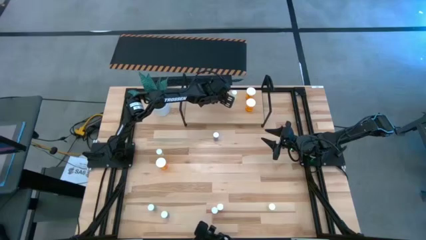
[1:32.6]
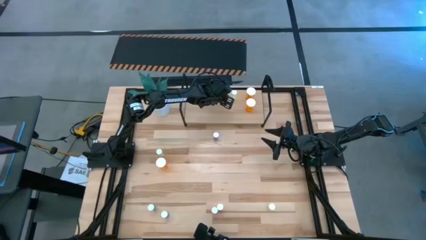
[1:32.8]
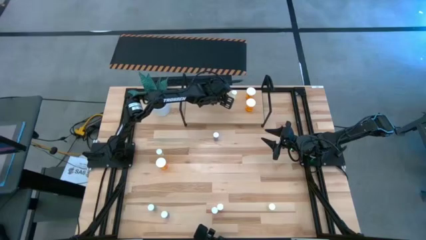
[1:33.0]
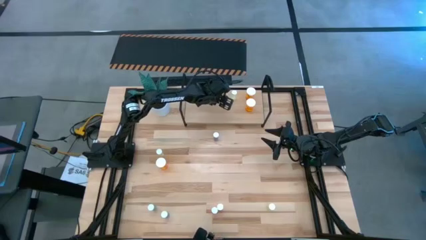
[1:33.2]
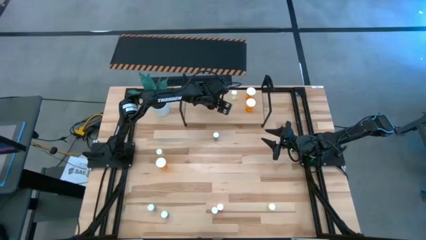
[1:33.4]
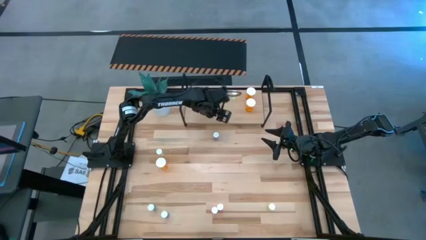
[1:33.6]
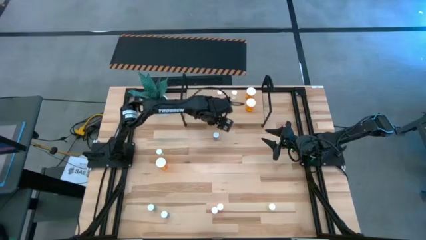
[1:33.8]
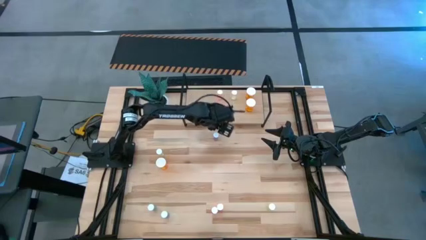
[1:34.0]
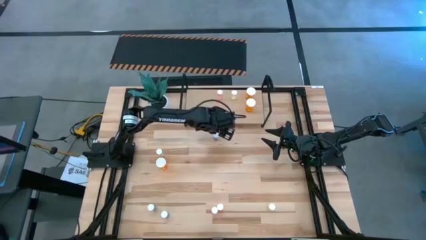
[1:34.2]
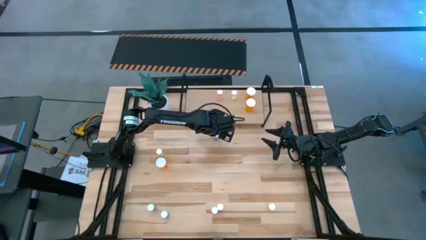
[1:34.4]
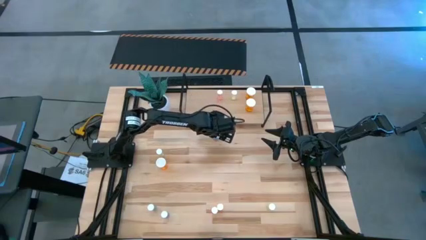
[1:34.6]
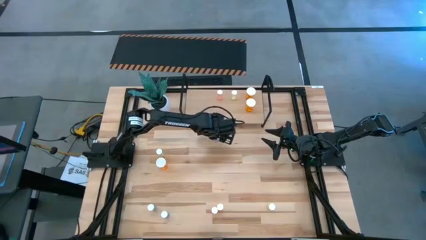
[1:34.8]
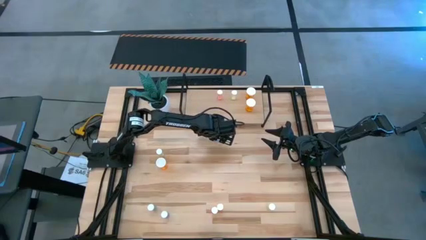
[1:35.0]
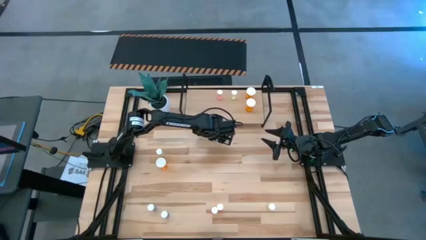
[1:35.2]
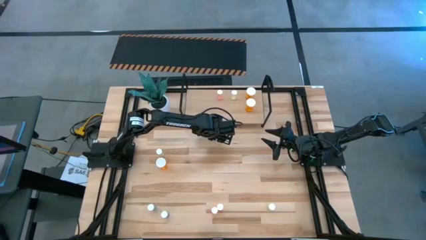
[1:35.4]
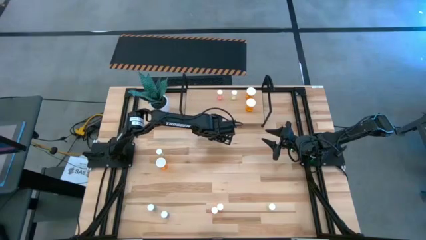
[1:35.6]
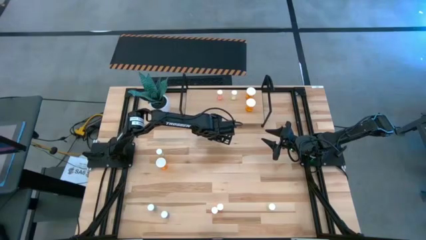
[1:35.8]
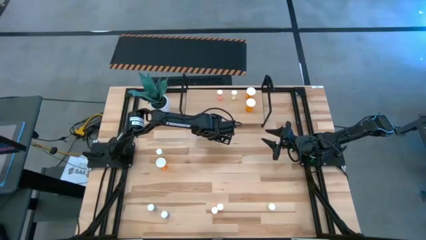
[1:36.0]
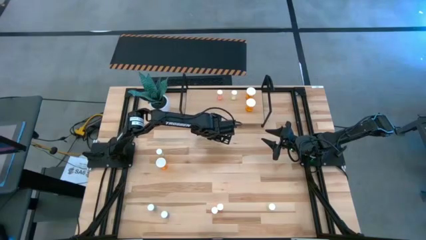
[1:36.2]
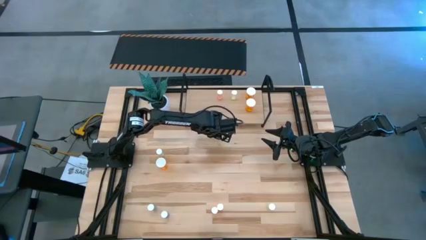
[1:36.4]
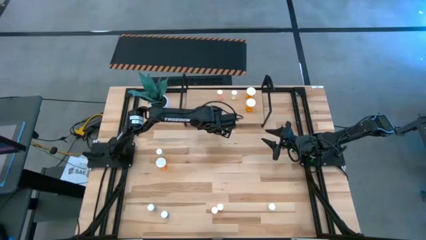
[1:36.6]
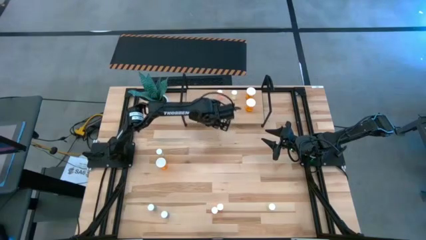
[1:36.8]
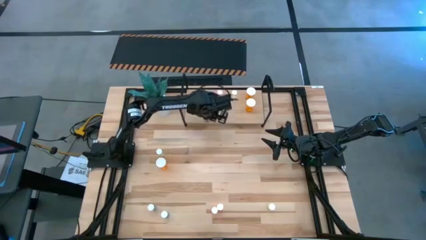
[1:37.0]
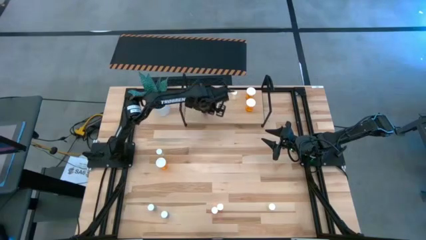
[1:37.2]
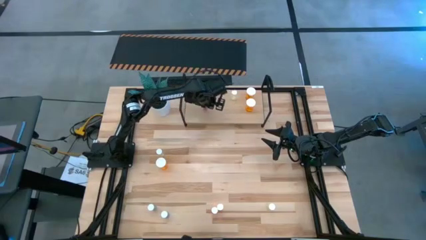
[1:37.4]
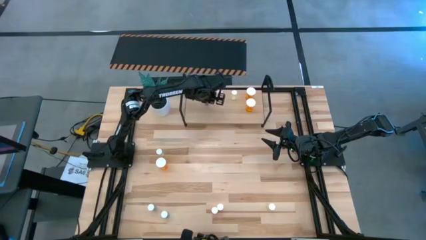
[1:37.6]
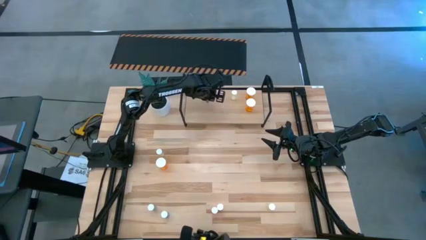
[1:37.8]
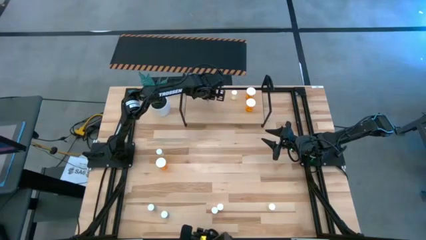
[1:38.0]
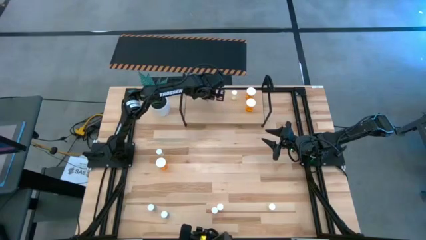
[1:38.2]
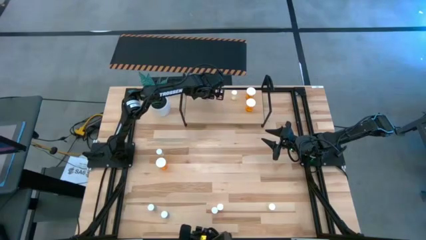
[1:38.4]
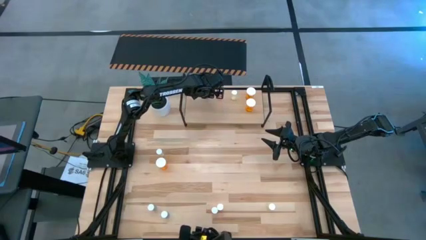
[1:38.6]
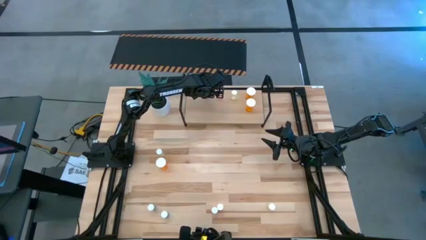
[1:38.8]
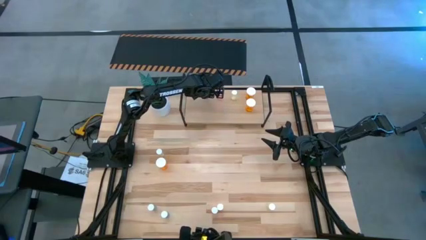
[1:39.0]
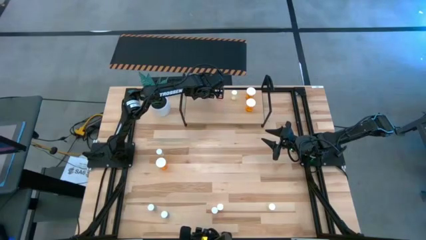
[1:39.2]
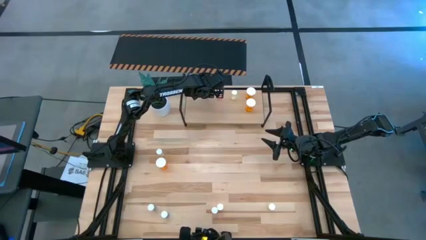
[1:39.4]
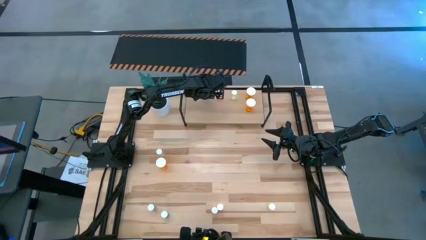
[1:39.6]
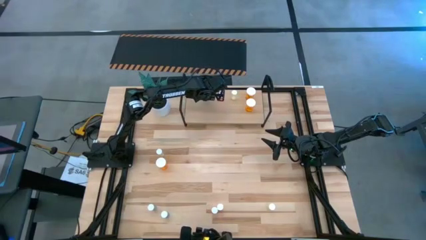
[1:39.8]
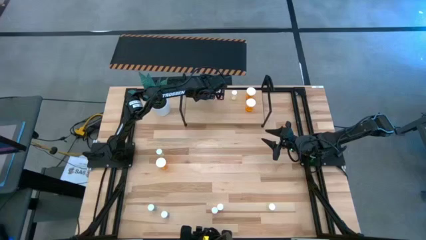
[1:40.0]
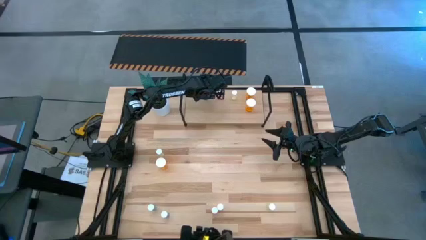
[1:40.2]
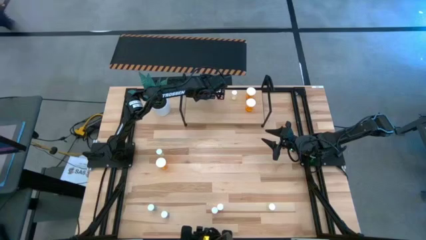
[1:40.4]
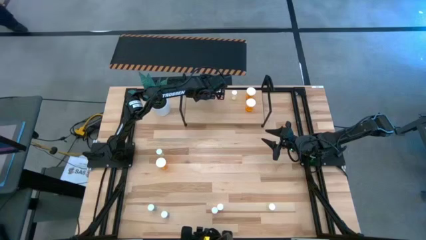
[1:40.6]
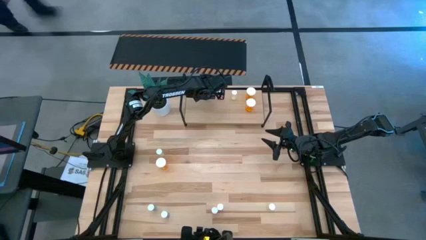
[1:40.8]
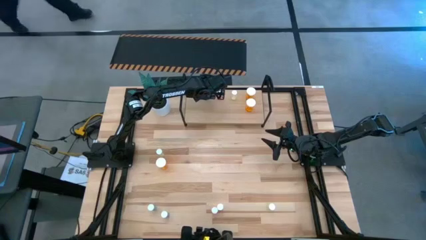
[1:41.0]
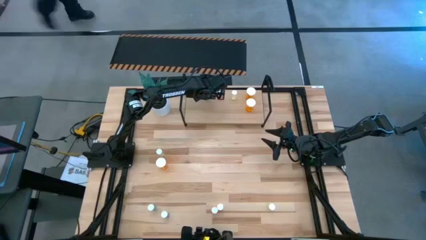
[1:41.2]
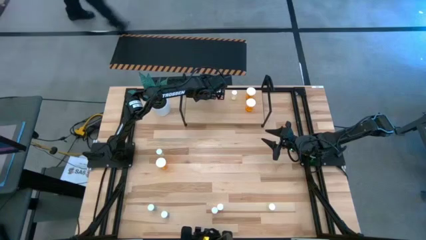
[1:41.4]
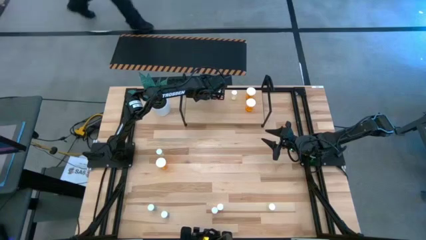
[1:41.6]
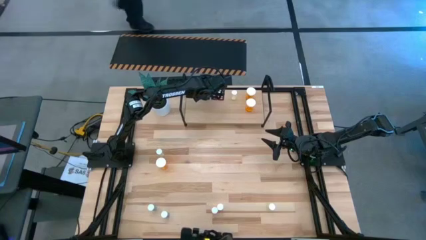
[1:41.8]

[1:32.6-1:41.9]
Task: Pick and place medicine bottles onto shelf by color
Put the blue pill bottle on the shelf

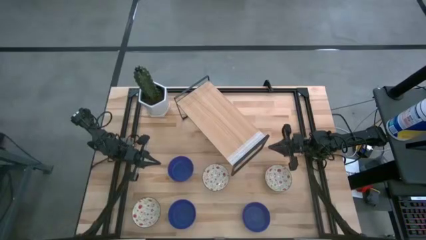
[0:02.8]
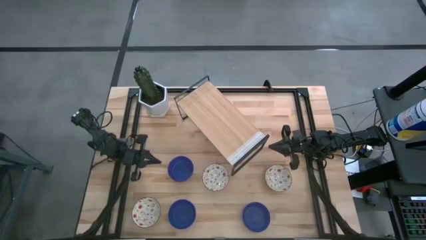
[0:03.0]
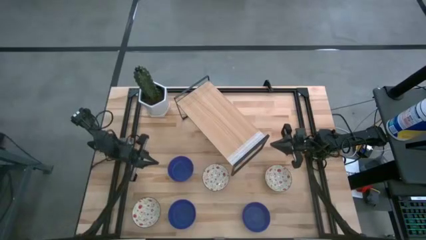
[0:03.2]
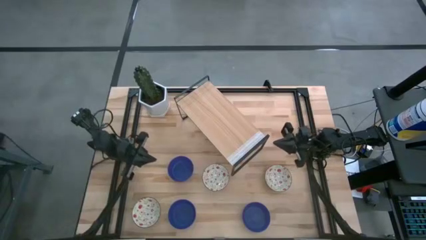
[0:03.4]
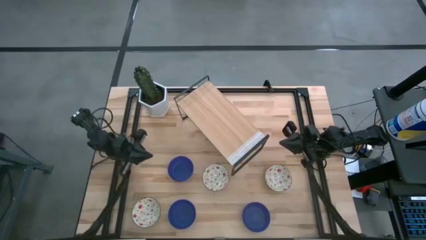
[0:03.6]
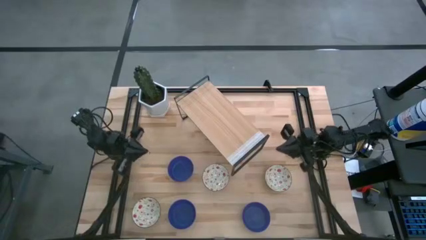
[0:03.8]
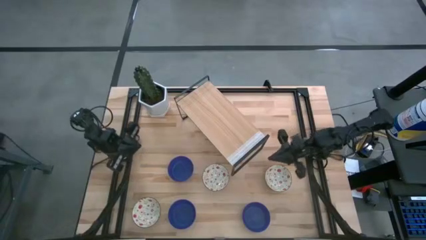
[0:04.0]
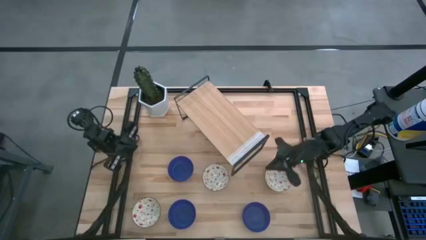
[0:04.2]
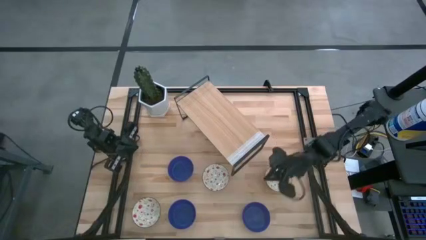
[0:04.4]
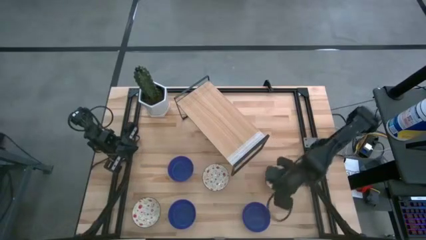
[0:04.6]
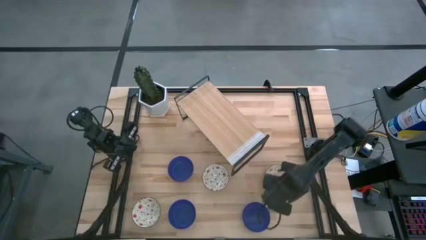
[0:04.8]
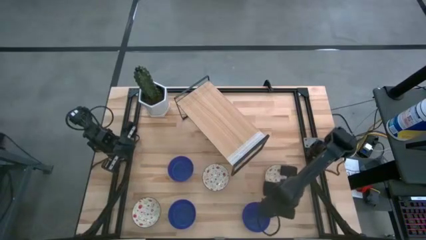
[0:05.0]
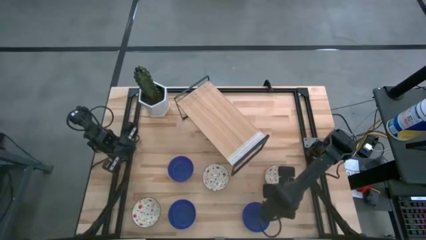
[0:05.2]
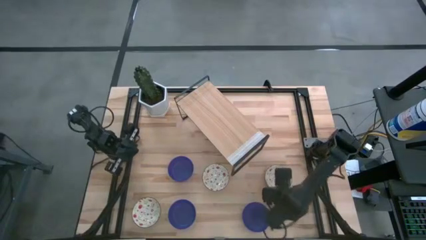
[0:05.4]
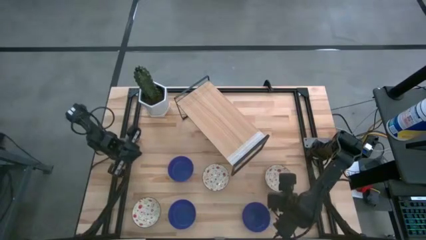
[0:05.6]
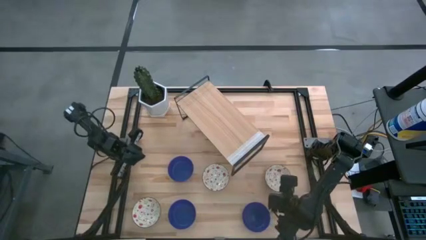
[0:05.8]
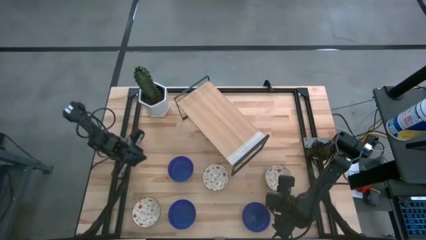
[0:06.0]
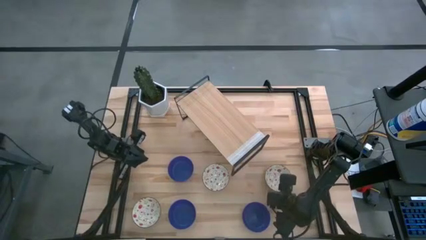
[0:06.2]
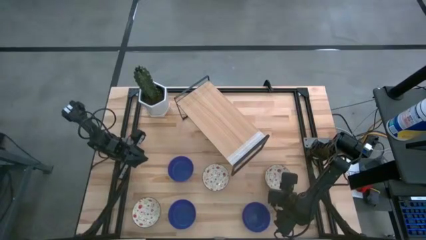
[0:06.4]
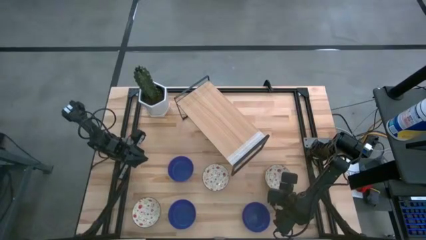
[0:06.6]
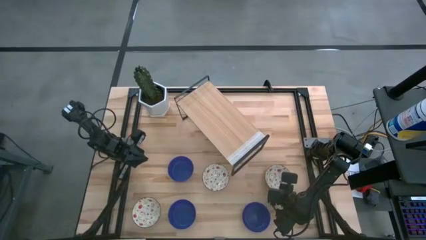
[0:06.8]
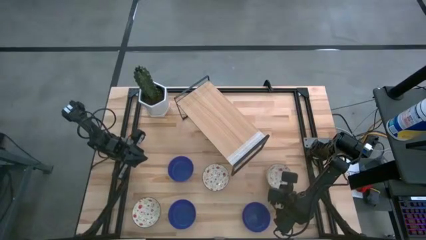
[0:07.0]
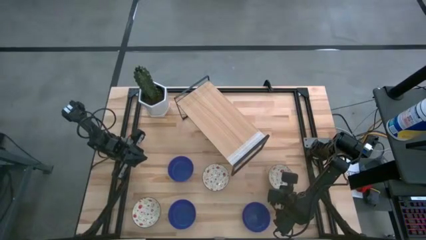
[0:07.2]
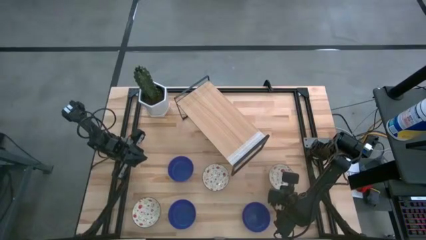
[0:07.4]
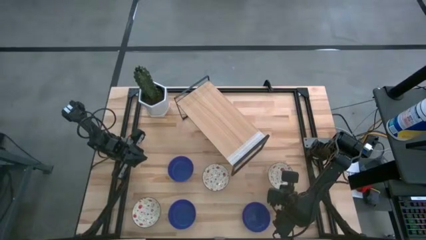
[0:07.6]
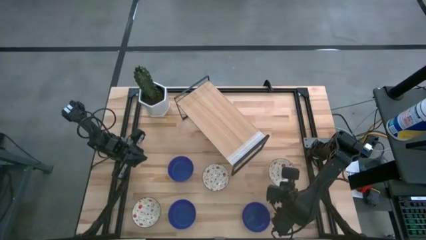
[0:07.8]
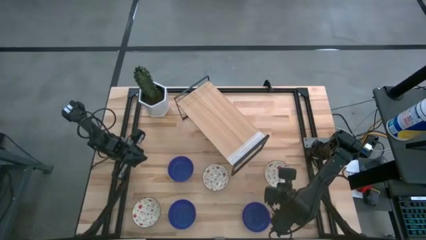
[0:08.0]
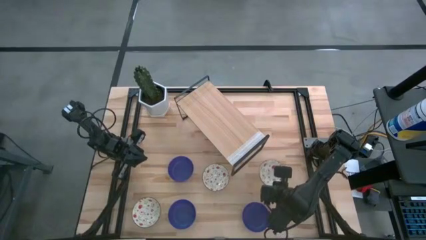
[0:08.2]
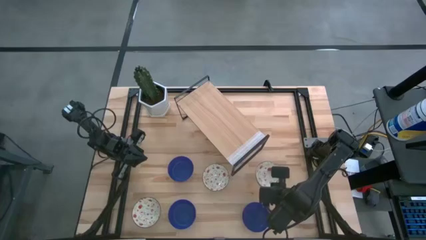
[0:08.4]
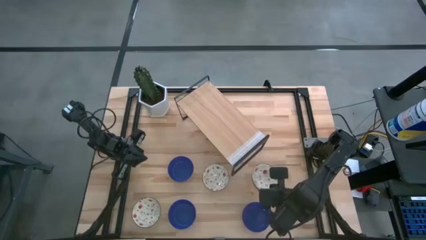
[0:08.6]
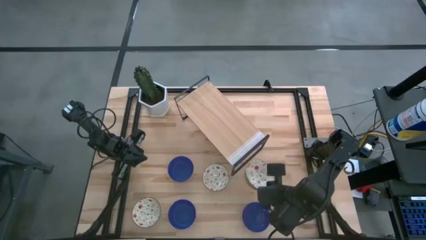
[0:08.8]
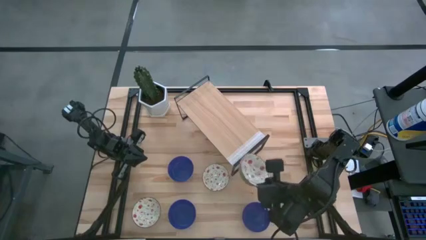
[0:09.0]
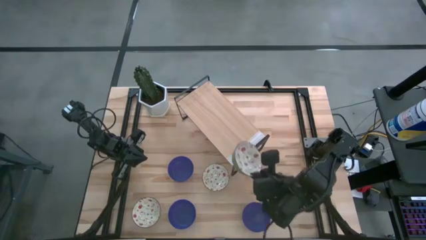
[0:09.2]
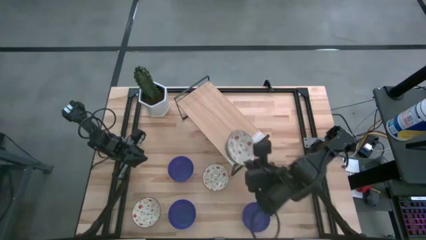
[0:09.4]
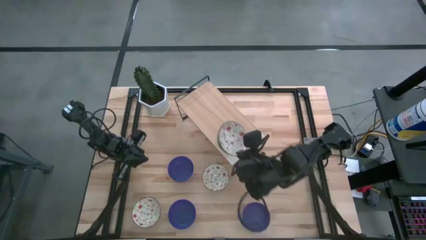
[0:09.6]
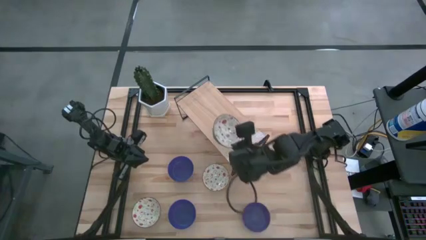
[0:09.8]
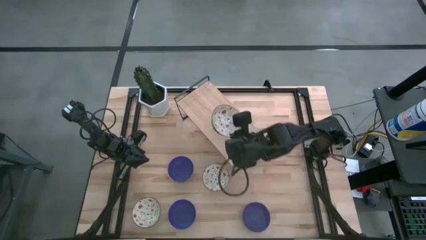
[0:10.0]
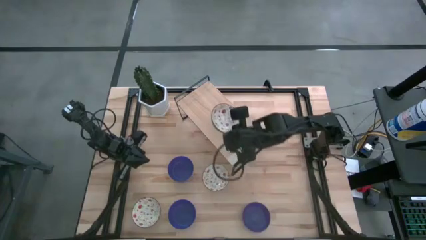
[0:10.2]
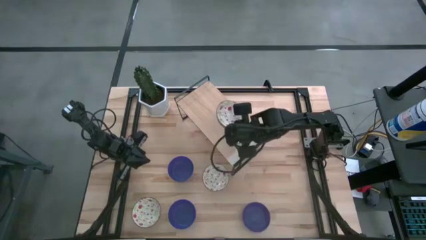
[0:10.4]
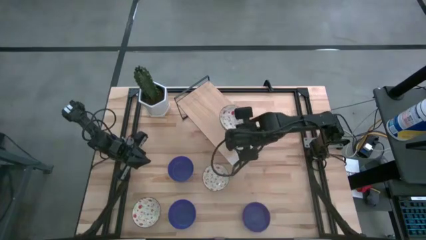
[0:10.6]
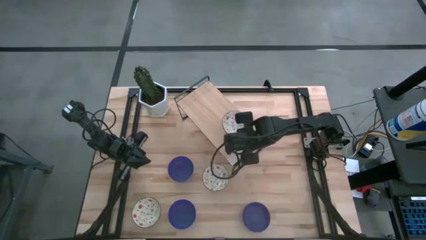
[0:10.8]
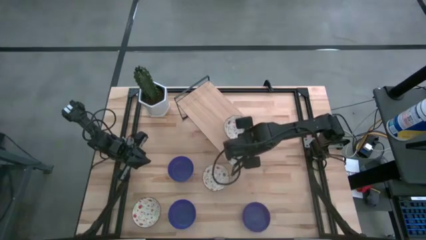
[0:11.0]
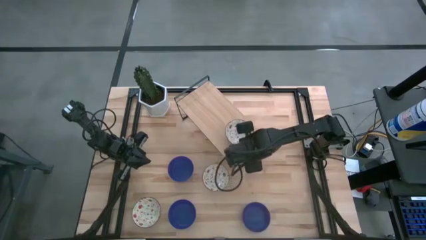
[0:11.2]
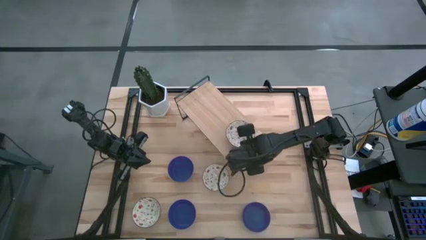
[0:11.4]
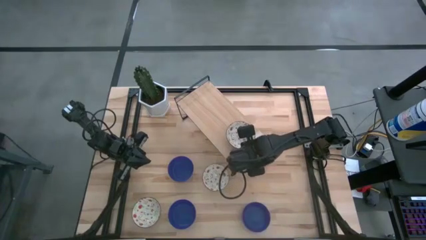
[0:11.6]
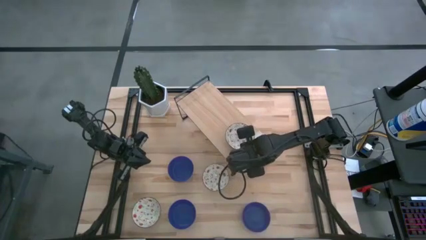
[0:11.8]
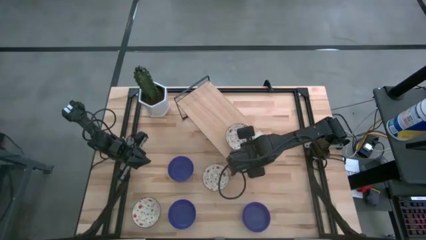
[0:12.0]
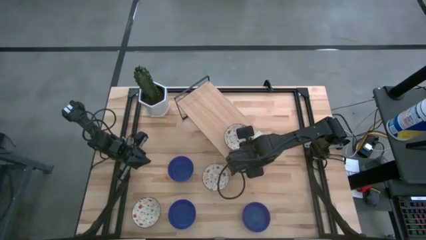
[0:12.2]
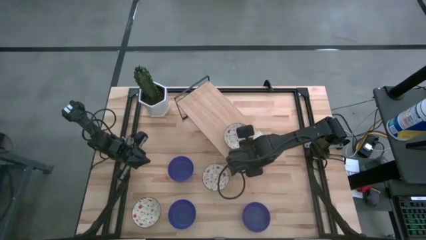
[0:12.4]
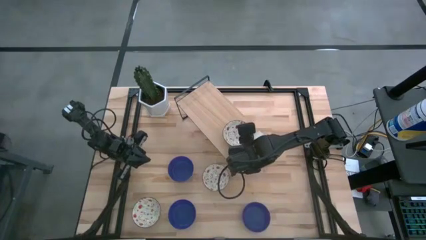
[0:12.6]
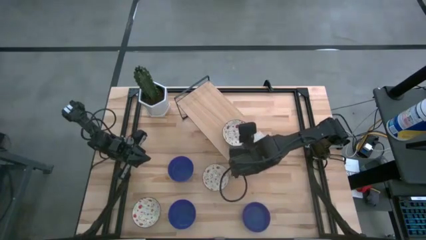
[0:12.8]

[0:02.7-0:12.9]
Task: Pick & Place Mini bowls
Put the top right white patterned bowl on the shelf
